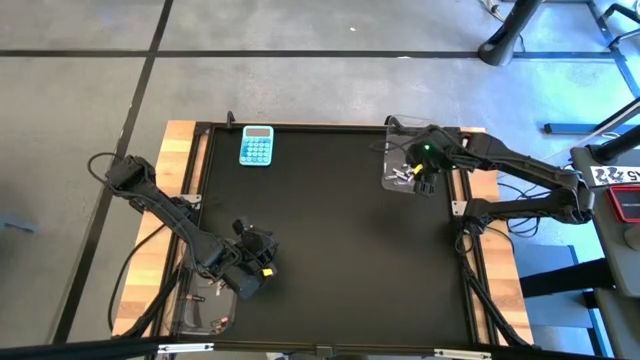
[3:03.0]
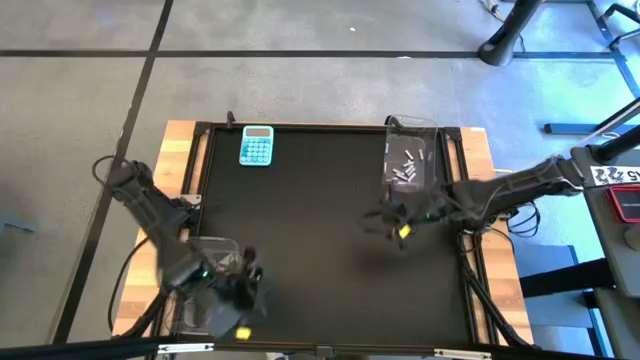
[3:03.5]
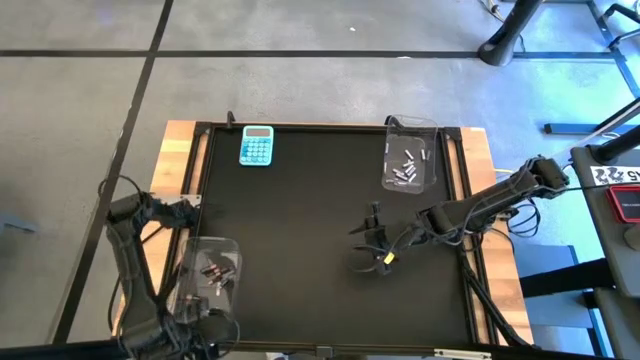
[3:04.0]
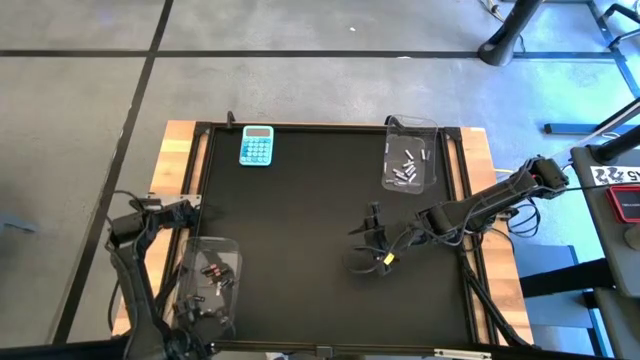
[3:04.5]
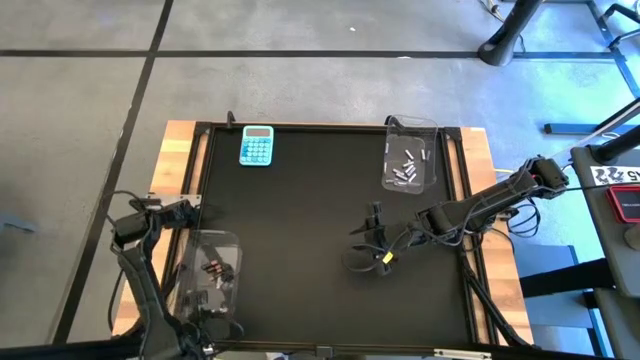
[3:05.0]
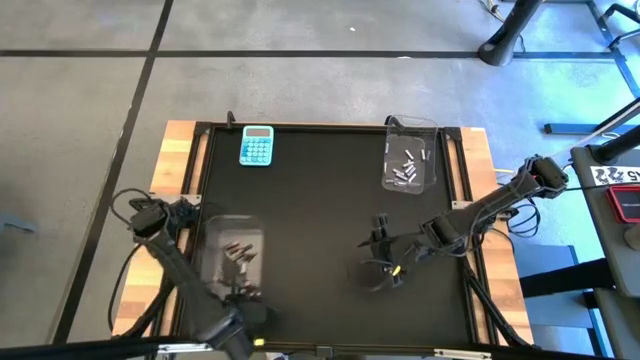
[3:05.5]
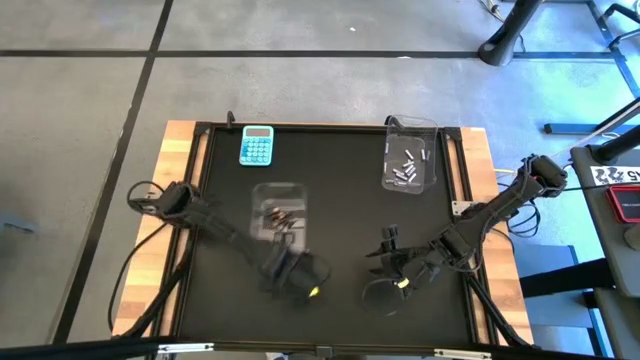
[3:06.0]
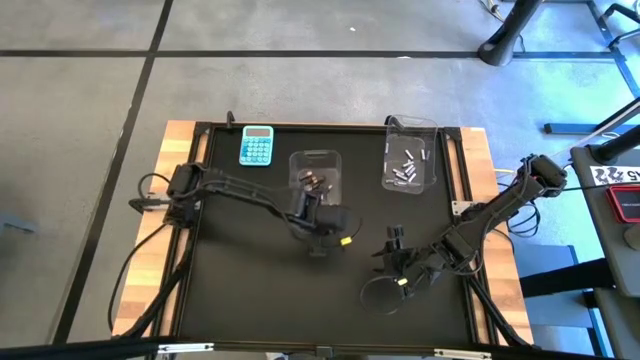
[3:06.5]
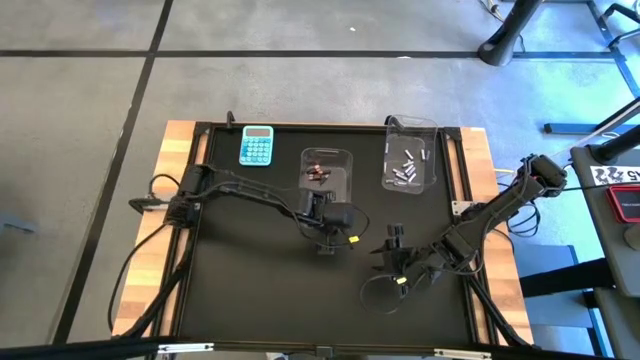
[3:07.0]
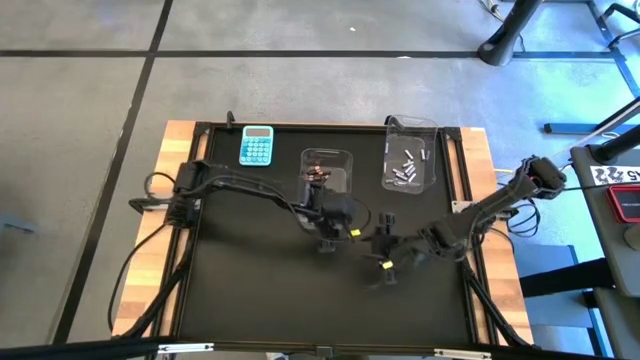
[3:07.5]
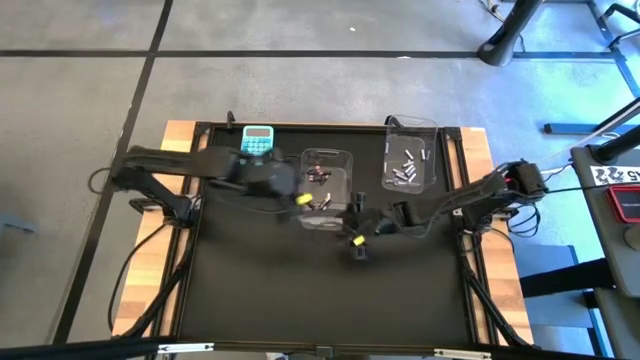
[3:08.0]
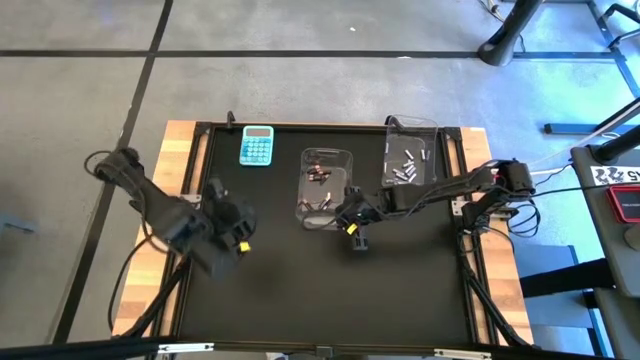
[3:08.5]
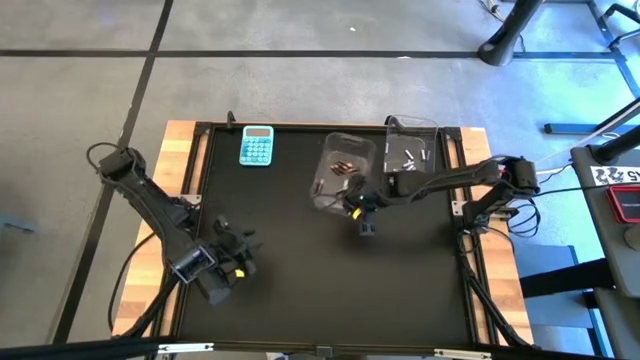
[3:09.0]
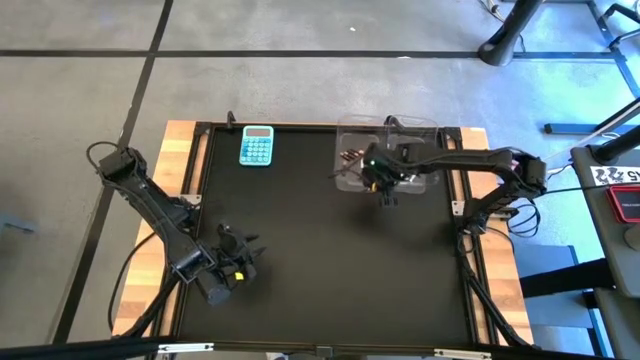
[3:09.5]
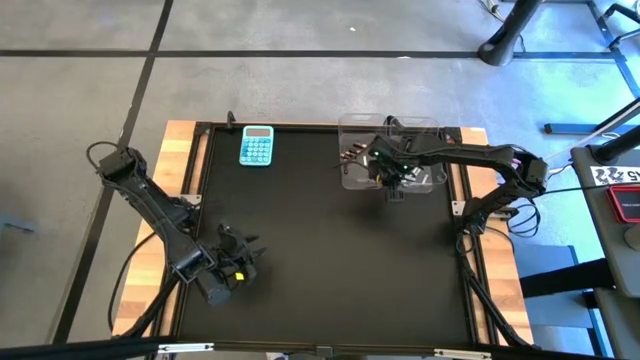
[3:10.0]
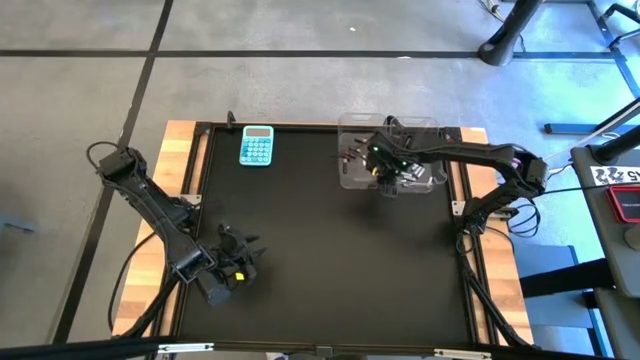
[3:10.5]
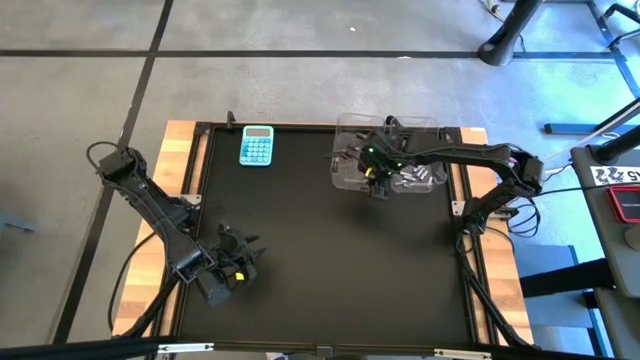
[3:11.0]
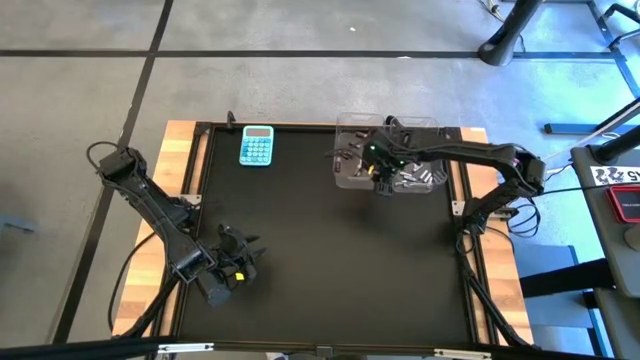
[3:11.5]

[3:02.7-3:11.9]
Task: Sort batteries
Move the bottom transparent bin to the top center of the table

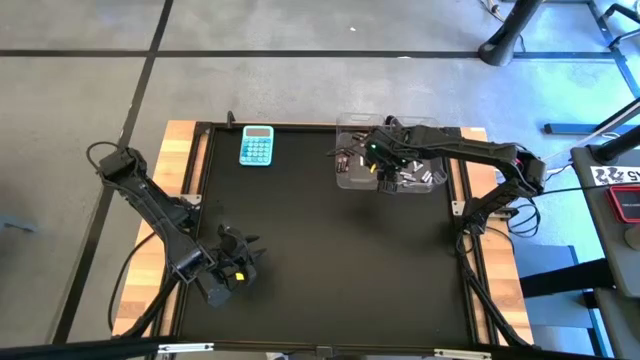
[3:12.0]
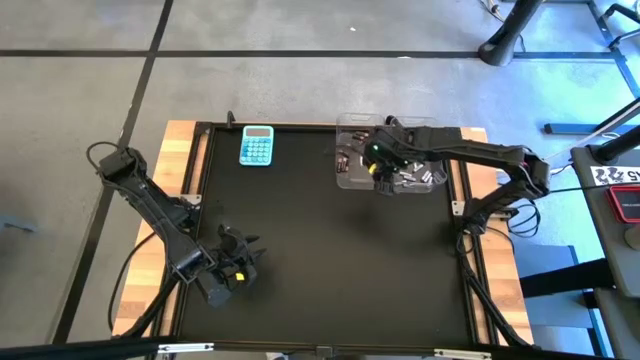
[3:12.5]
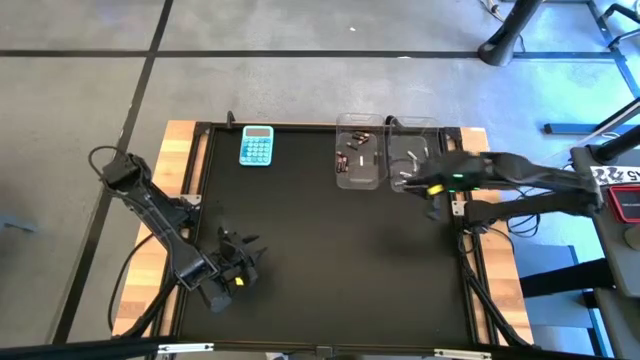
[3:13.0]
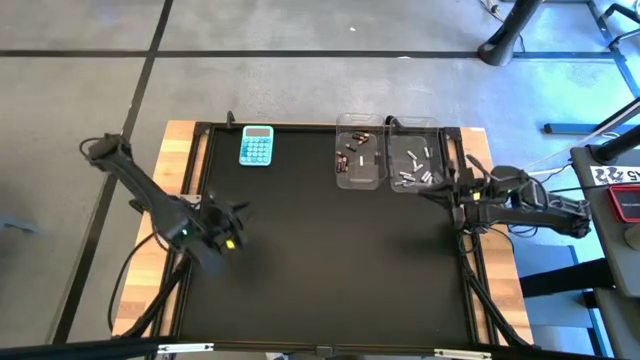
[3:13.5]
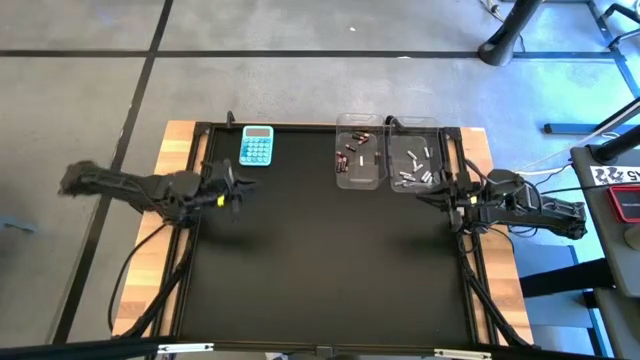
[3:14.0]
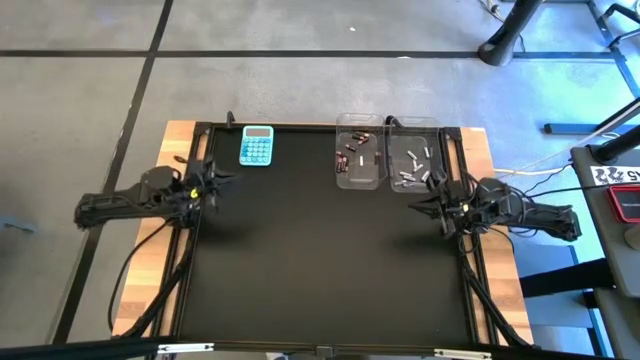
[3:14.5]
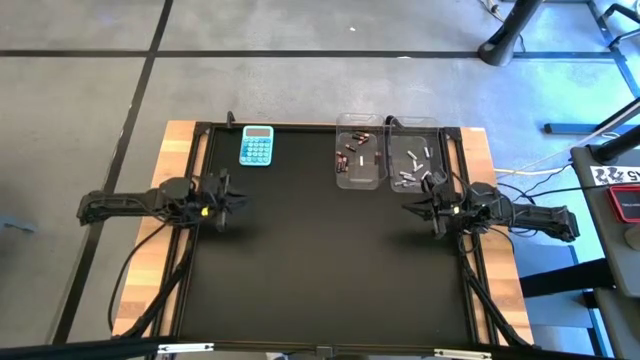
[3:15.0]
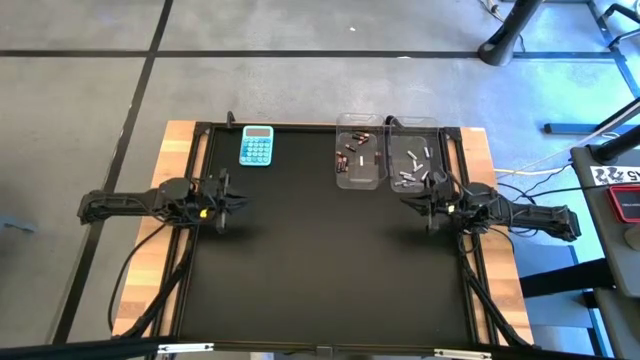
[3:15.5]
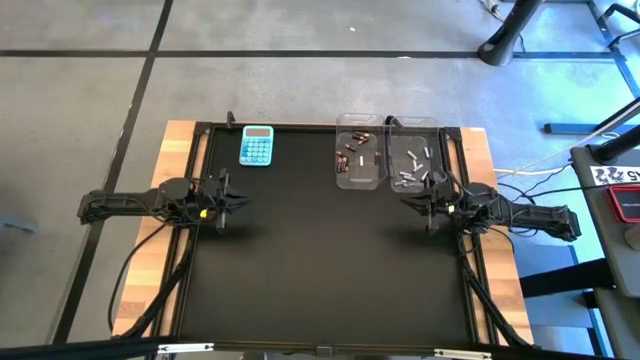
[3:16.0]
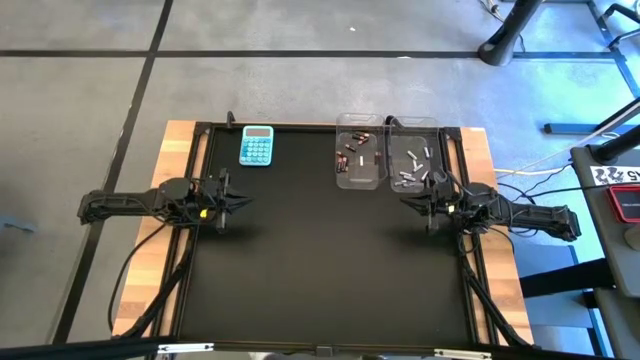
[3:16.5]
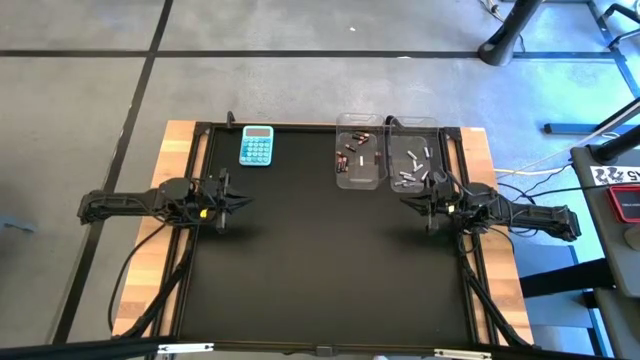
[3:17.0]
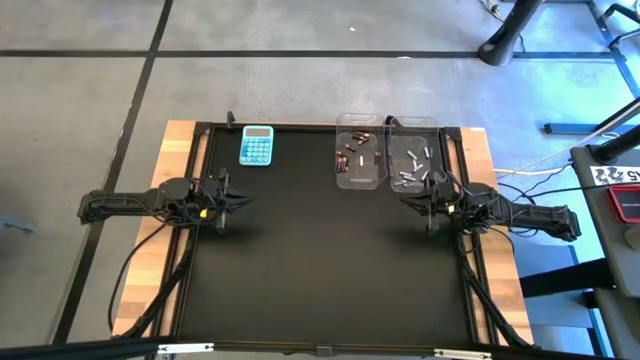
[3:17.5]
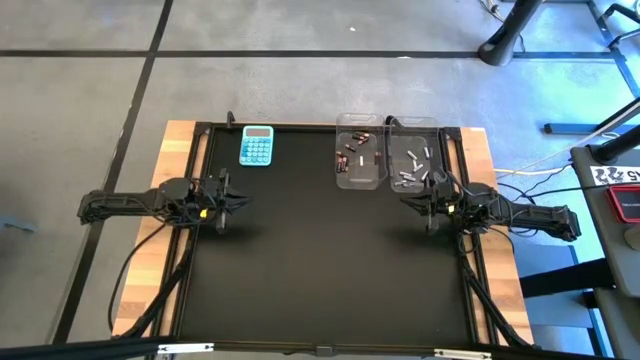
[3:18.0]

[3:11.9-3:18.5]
Return to Home Position

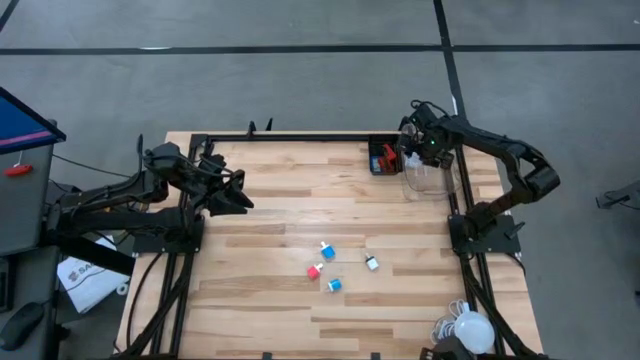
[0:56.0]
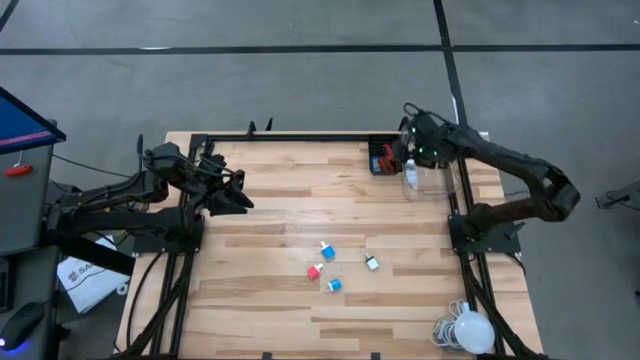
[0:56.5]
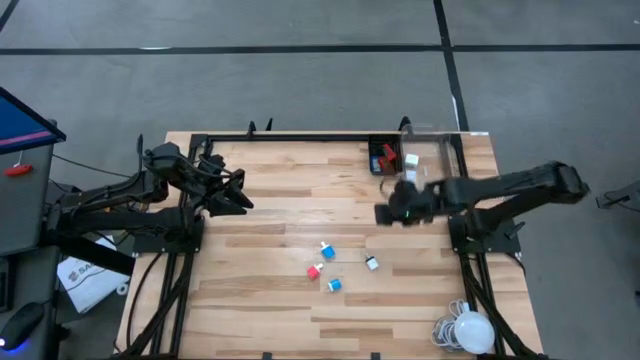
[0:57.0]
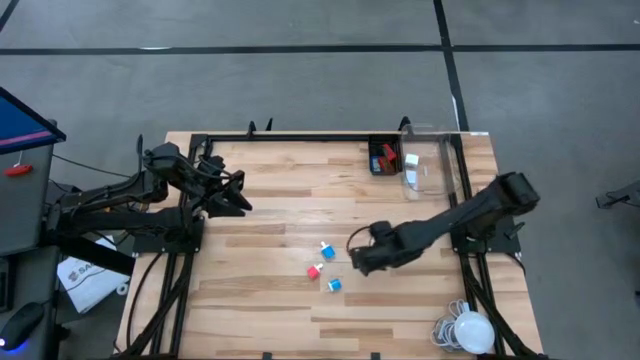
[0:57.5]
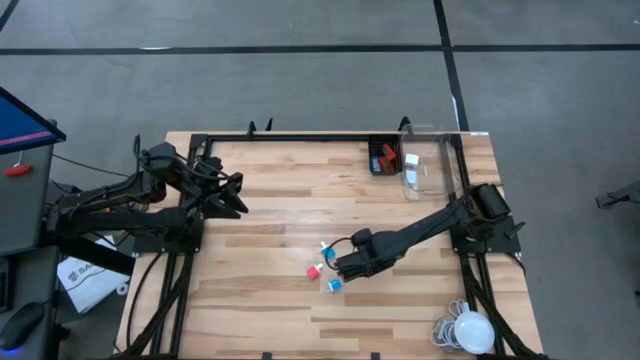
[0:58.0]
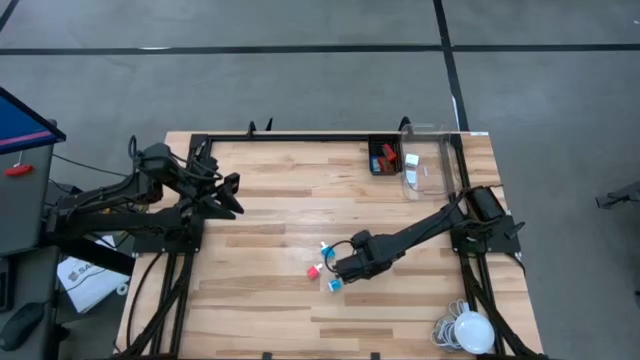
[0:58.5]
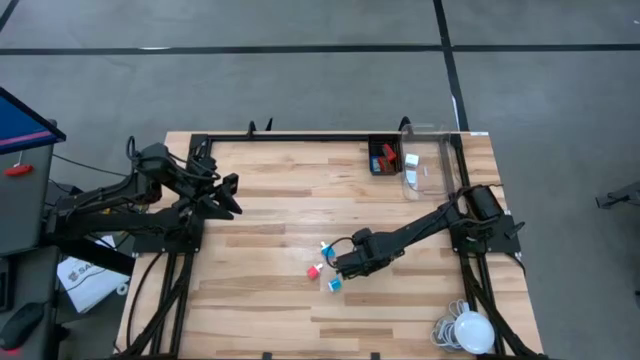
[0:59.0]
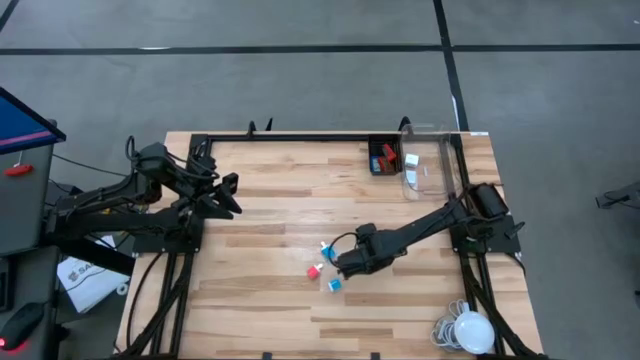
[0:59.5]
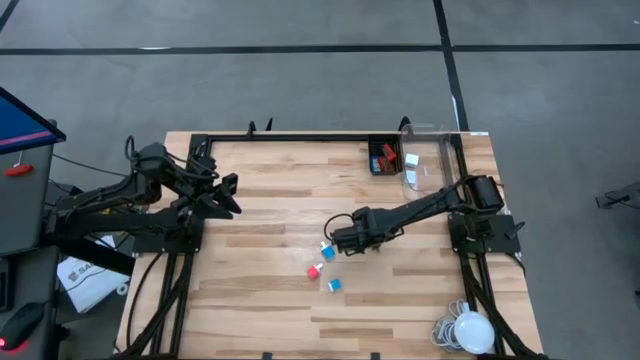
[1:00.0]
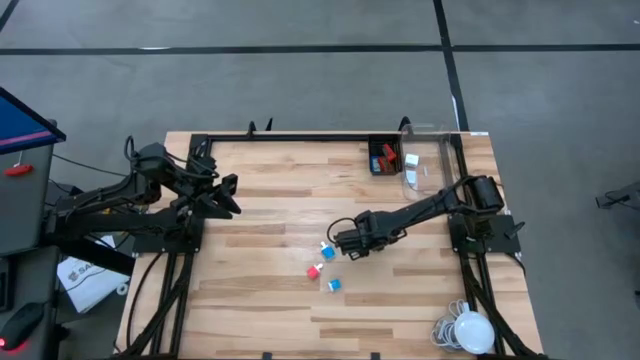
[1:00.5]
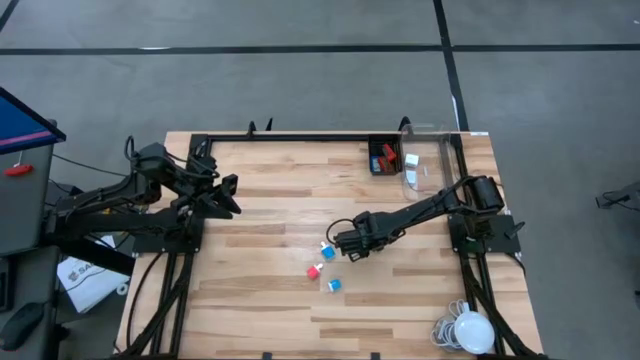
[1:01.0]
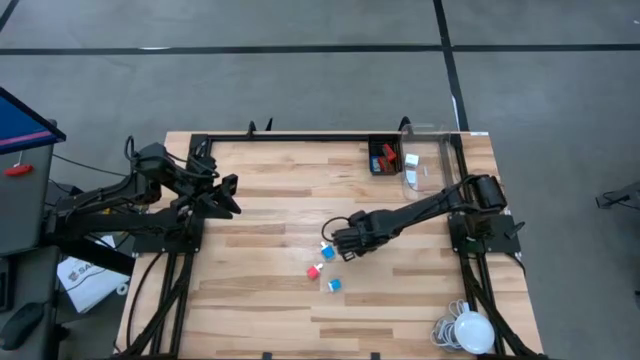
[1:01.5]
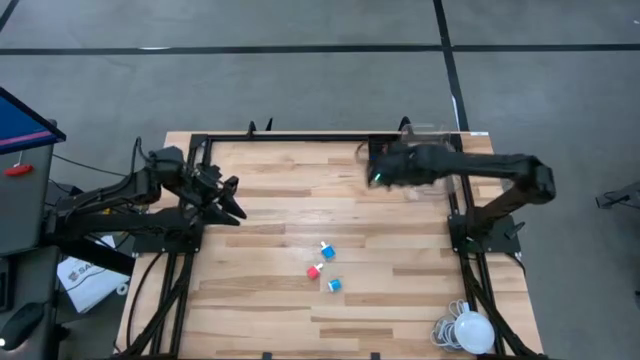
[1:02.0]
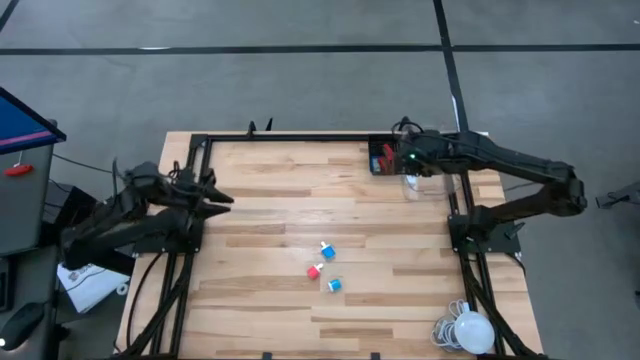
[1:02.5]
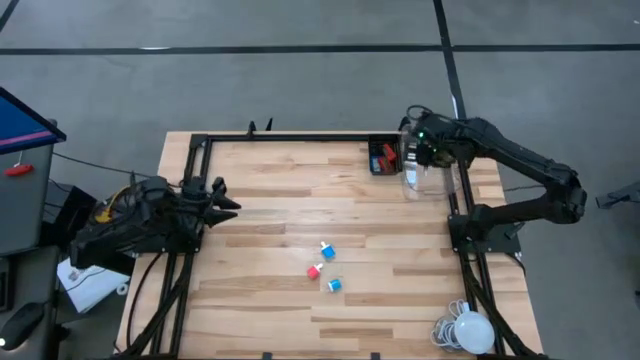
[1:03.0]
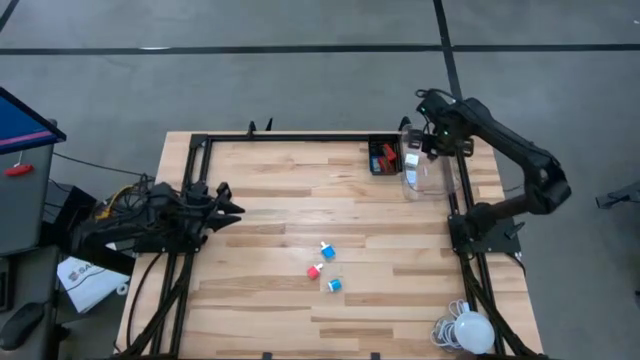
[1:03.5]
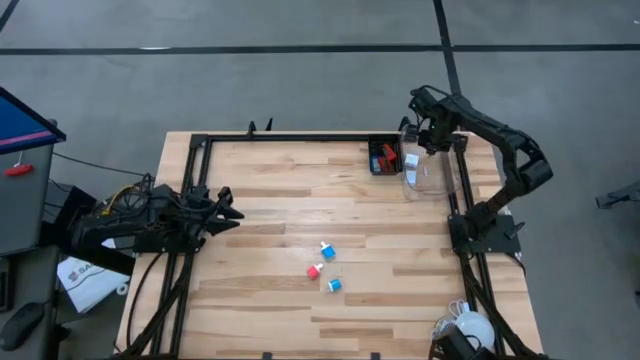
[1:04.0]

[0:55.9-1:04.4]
Task: Pick & Place Office items
Put the black and white charger adapter into the transparent bin
